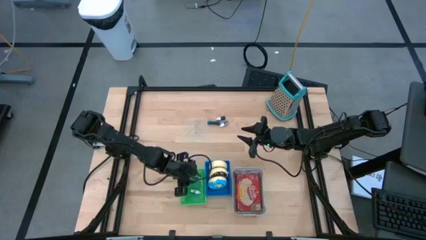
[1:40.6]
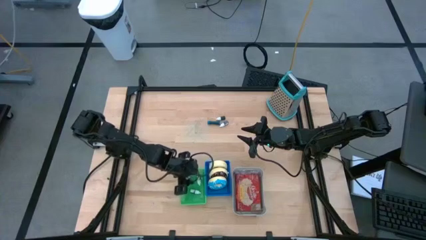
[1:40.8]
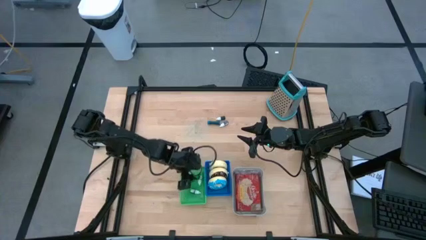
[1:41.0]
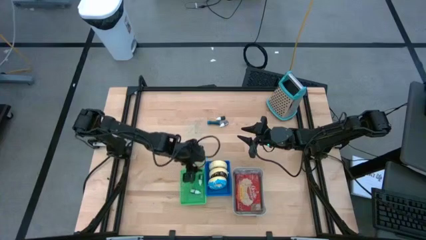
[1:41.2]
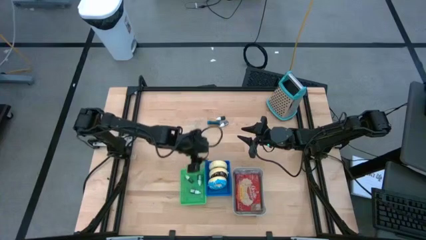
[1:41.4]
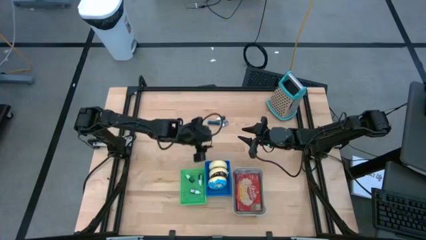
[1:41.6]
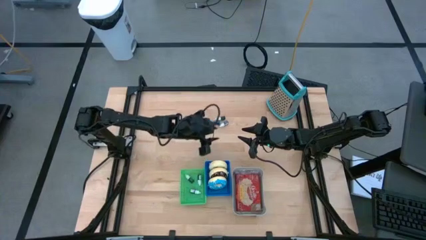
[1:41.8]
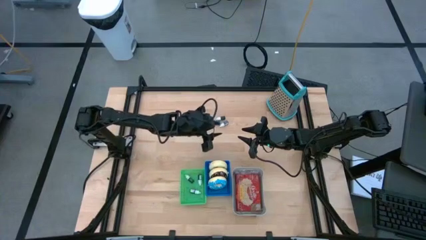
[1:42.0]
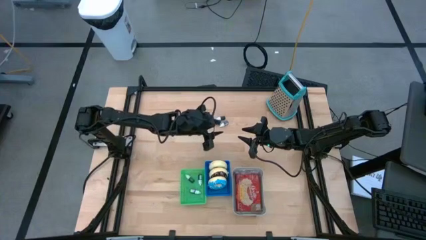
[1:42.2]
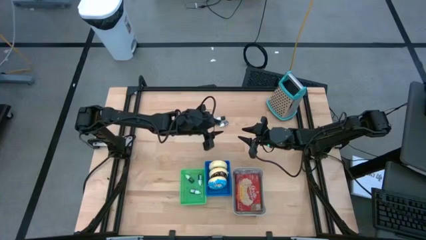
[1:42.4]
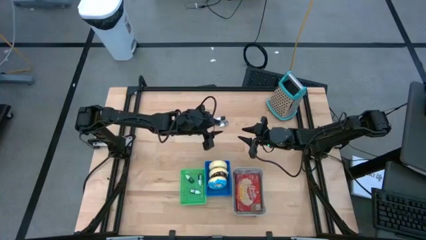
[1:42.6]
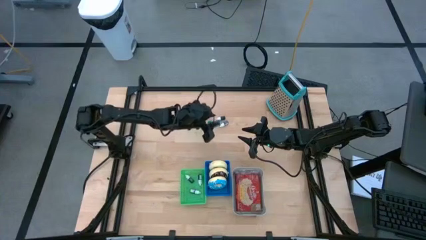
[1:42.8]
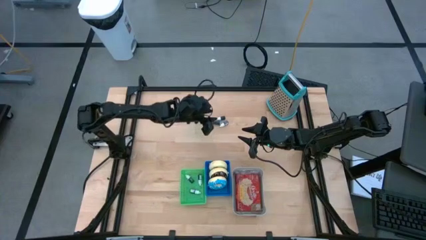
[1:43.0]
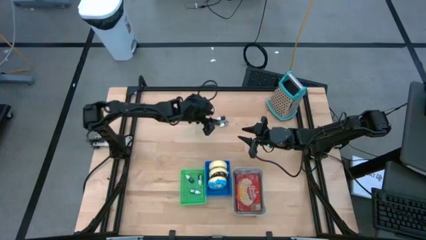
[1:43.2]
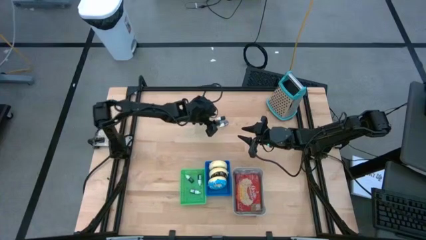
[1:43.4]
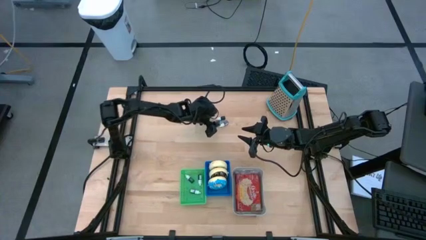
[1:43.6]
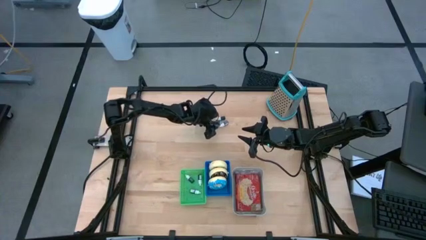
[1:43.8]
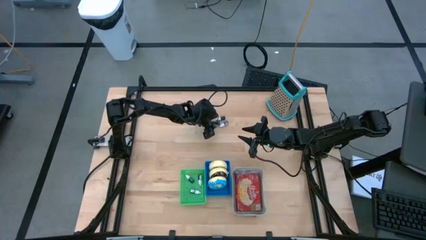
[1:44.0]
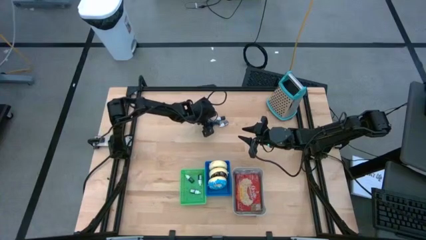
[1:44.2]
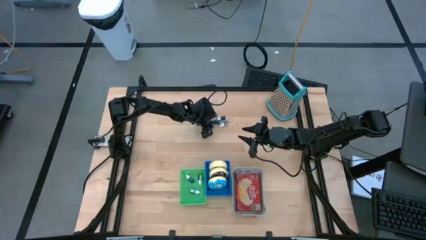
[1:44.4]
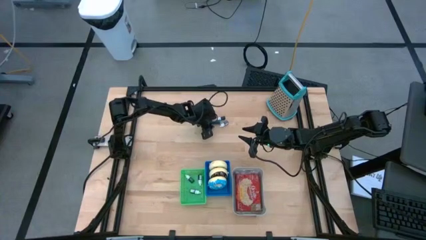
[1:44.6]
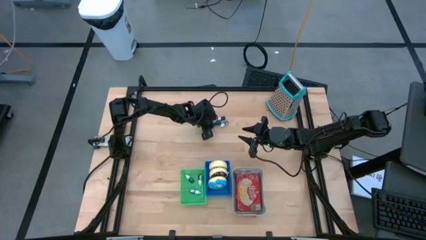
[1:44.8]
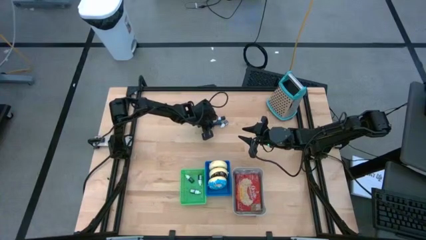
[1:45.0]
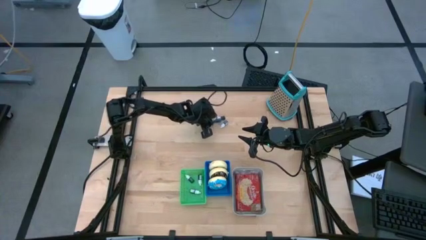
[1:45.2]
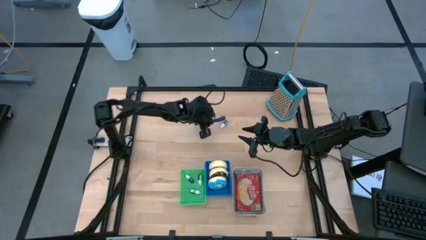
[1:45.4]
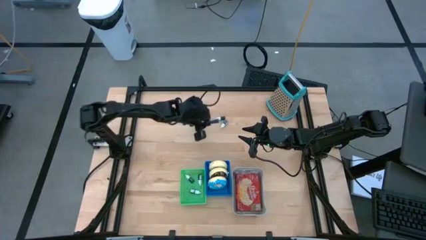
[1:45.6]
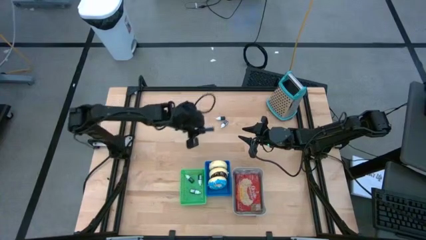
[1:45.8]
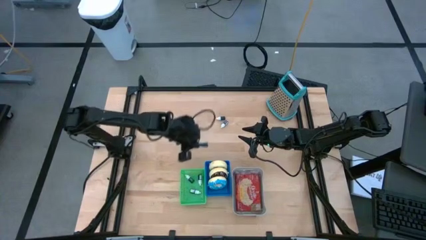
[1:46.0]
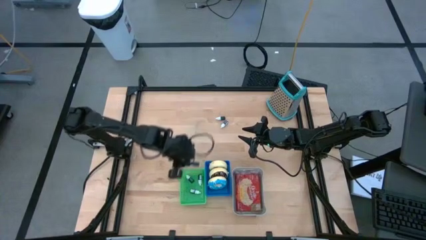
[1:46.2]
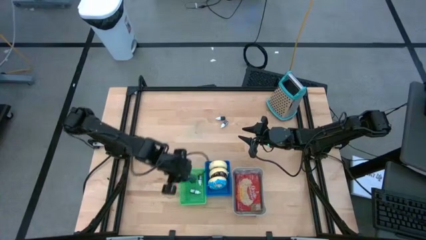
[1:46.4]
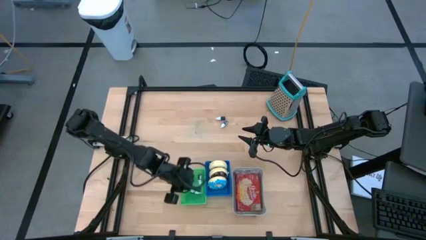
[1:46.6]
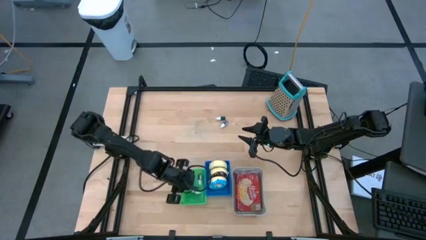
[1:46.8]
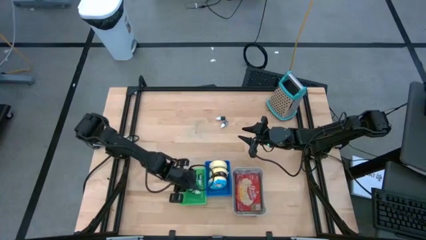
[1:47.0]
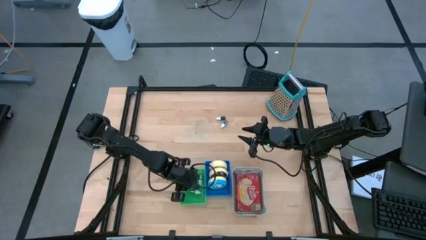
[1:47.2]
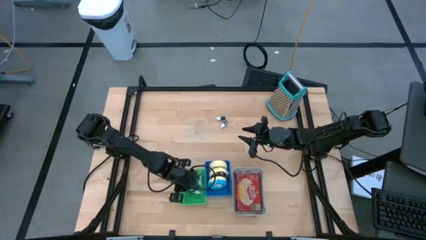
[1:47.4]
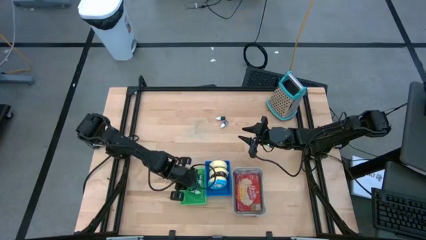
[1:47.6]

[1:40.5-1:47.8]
Put the blue food coloring bottle into the green bin

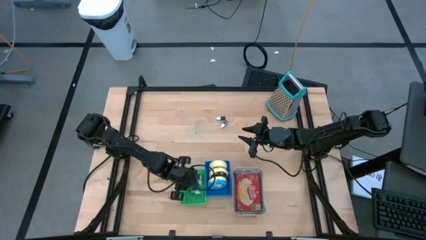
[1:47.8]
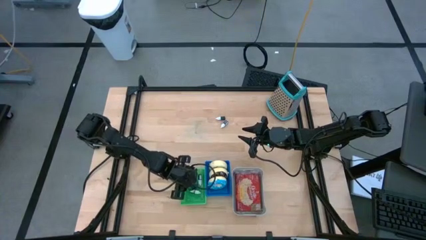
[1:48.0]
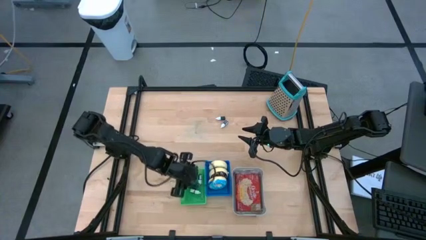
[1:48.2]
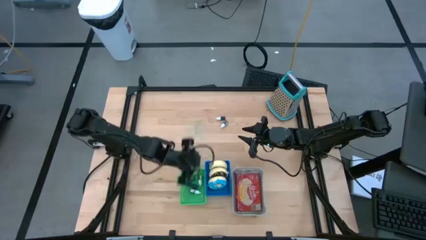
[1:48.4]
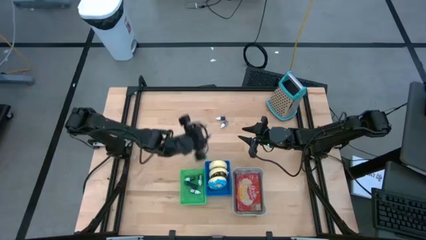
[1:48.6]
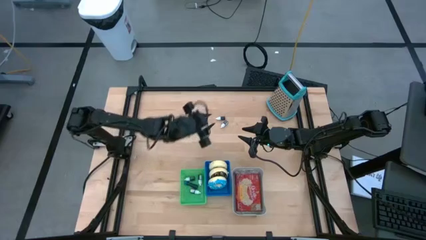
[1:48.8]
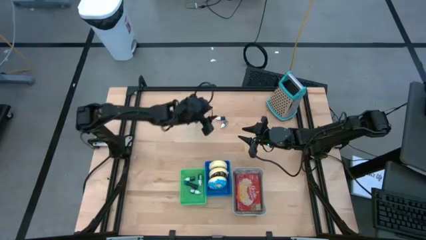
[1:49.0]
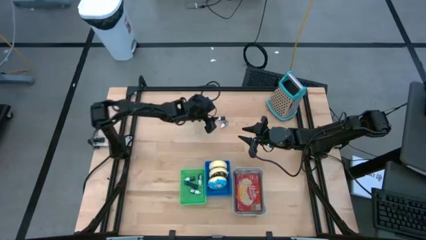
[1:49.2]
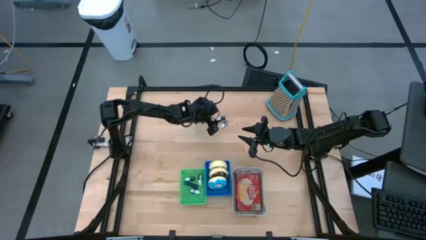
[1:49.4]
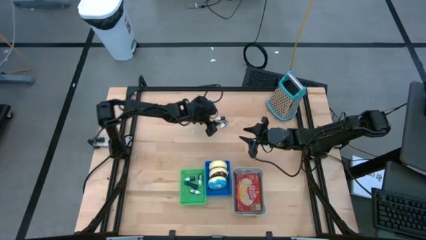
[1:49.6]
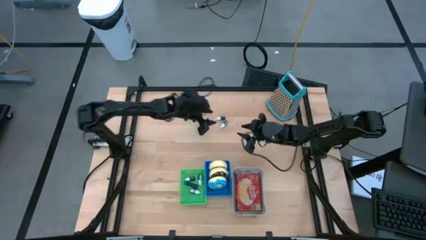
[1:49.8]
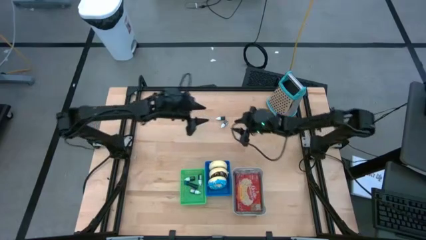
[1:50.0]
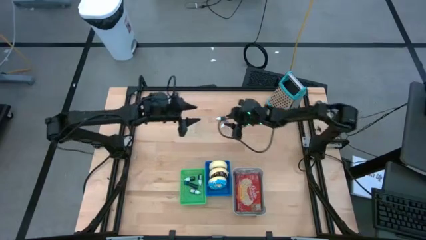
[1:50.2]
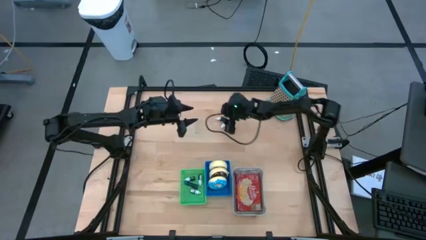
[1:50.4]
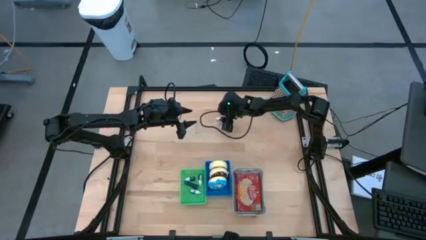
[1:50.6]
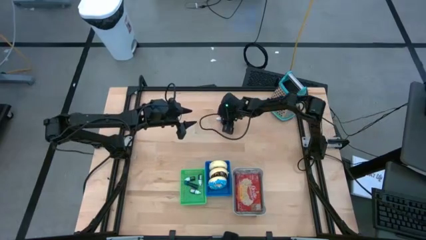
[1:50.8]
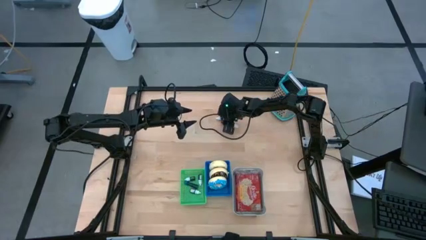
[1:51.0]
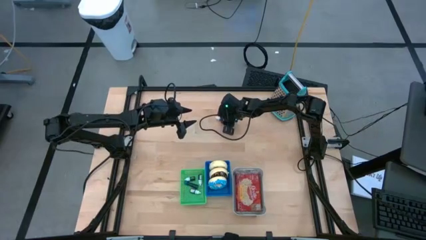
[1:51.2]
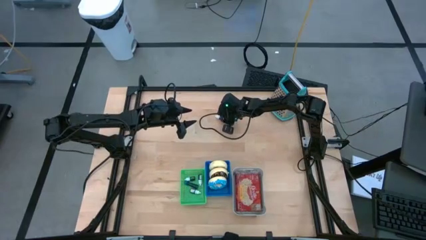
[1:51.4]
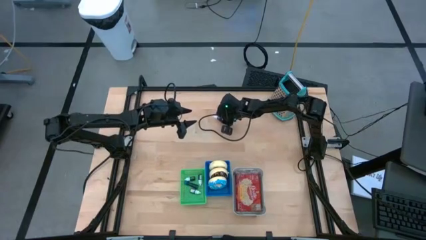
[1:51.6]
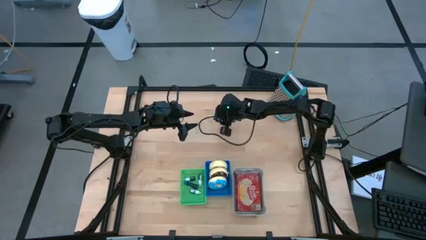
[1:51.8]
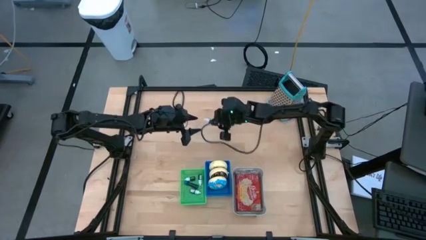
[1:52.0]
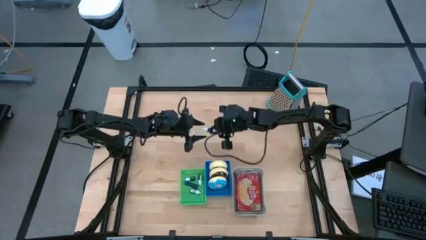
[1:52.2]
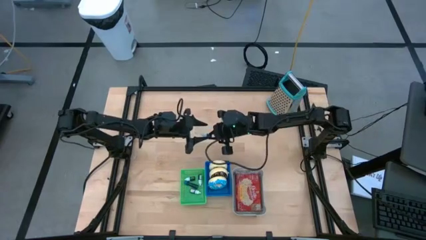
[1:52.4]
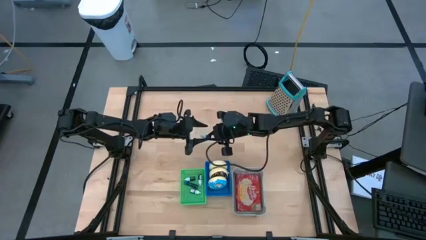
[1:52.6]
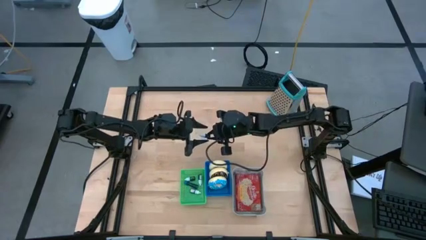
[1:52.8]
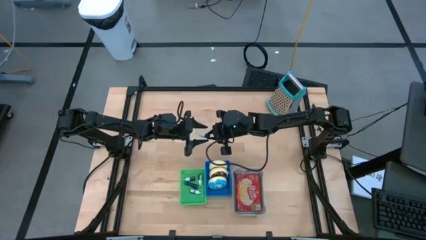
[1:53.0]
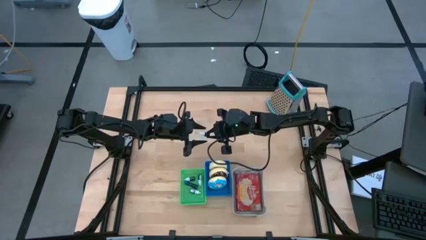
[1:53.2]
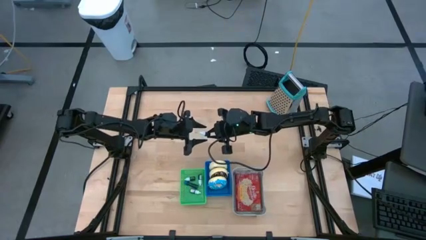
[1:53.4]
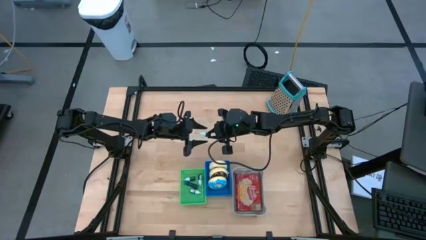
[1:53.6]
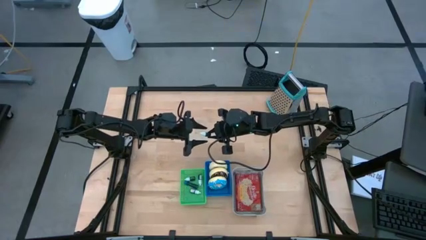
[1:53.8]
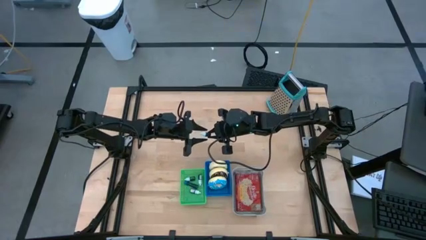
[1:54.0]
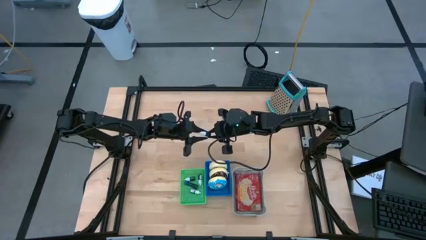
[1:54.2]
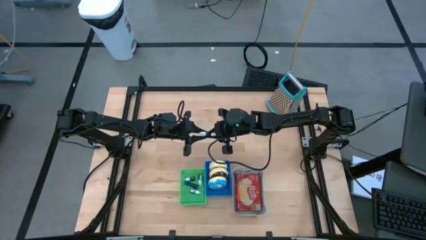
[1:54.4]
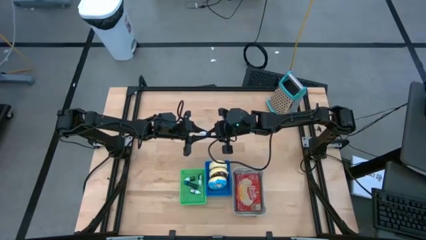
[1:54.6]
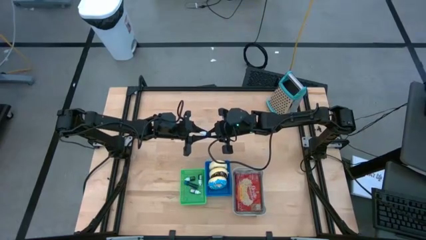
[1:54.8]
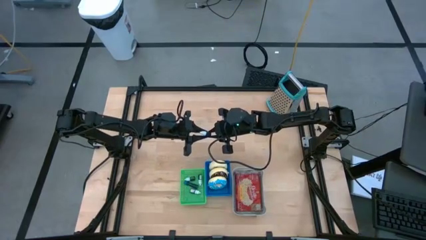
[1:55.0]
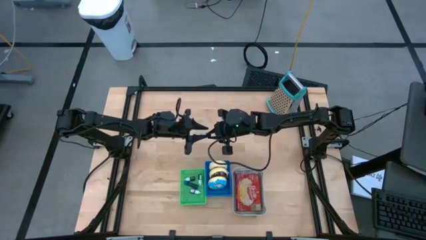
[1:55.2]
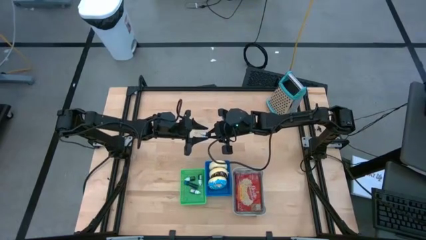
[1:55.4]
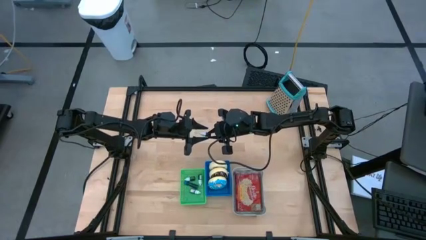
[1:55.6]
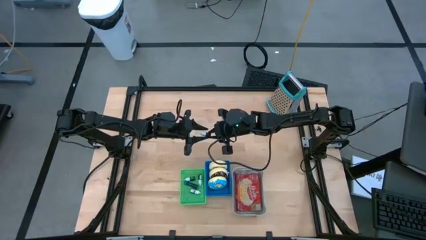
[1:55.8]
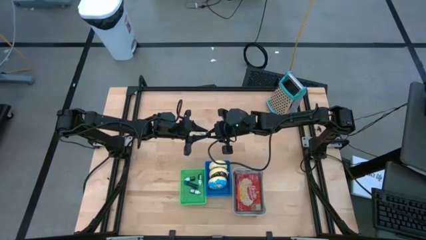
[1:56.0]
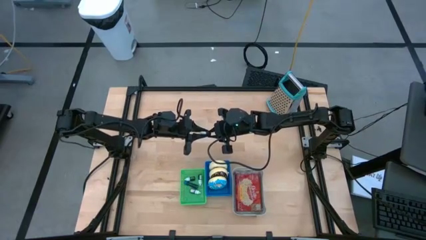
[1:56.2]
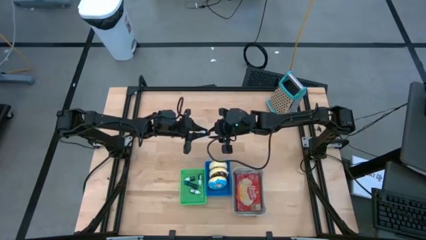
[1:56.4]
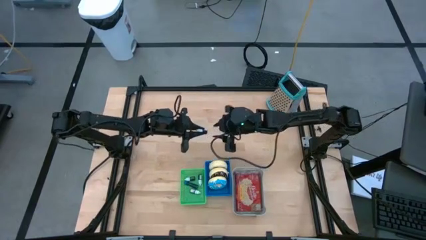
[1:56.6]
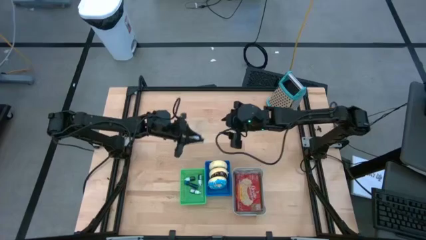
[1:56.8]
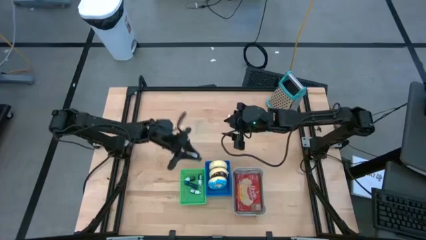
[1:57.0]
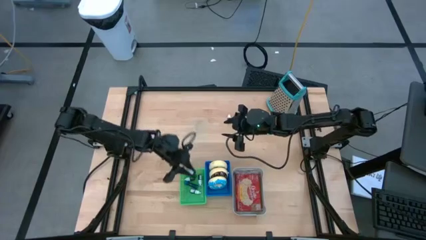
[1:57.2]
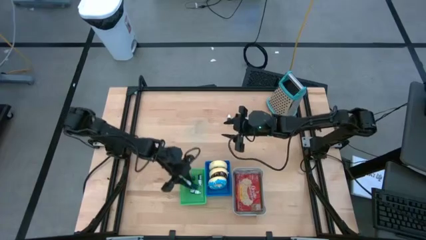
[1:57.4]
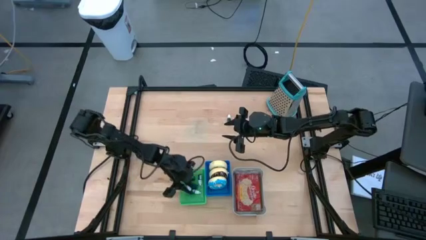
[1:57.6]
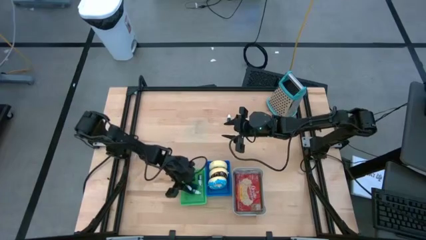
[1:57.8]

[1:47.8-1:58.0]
Put the dark green food coloring bottle into the green bin
